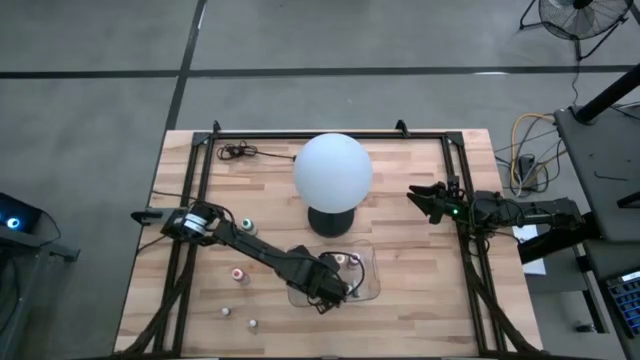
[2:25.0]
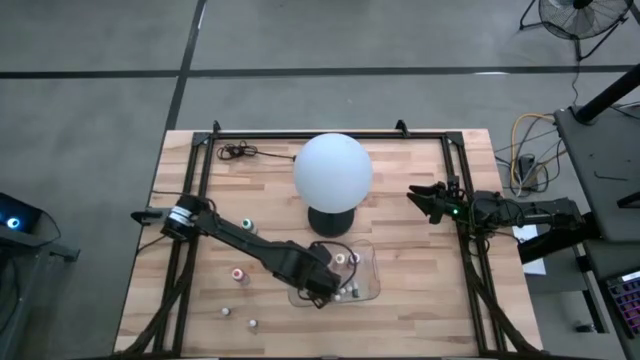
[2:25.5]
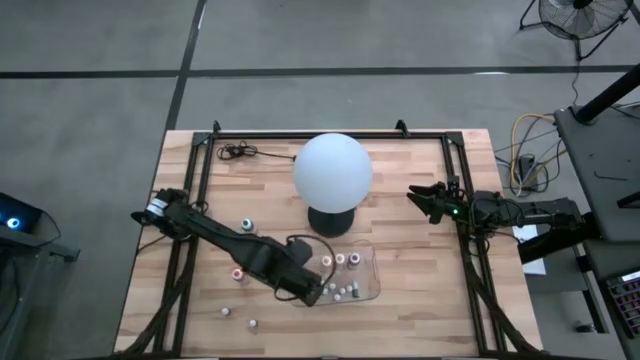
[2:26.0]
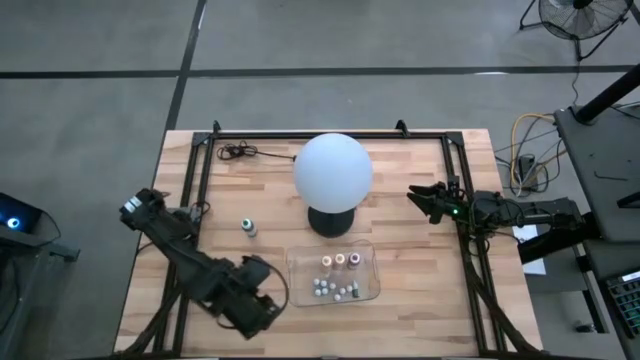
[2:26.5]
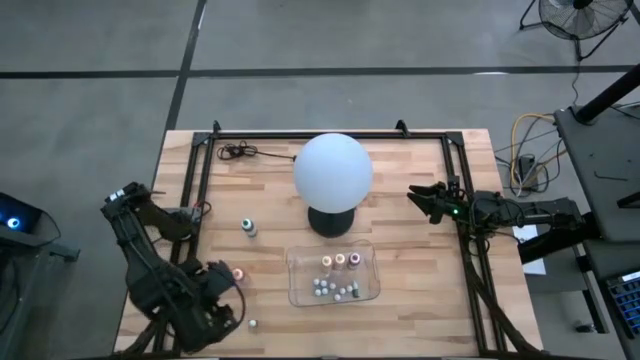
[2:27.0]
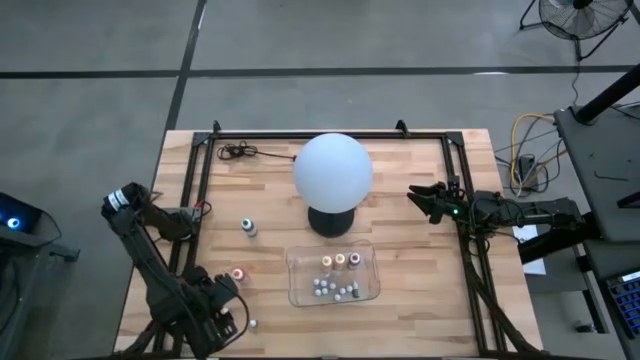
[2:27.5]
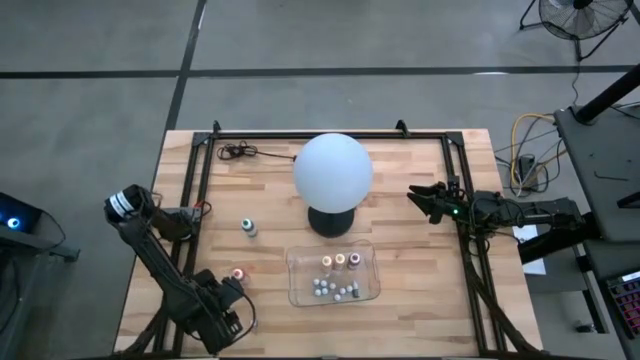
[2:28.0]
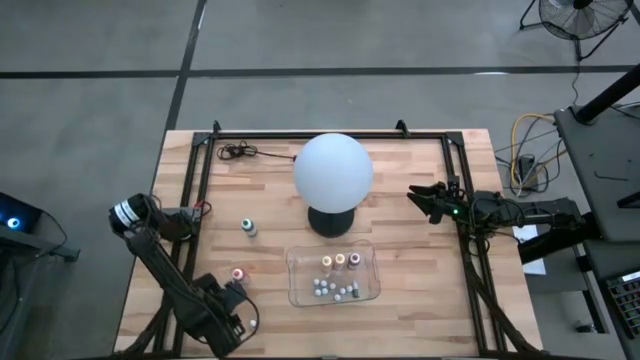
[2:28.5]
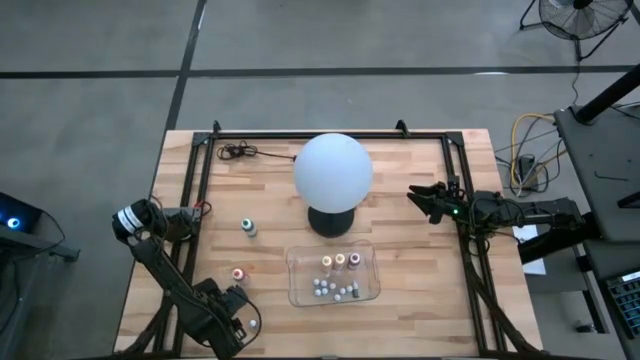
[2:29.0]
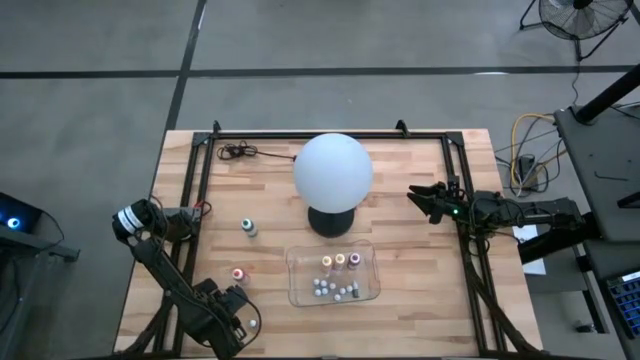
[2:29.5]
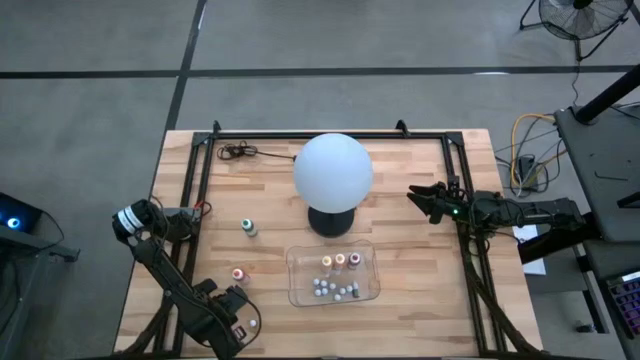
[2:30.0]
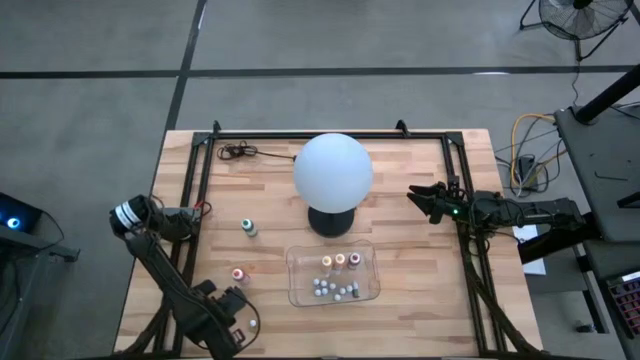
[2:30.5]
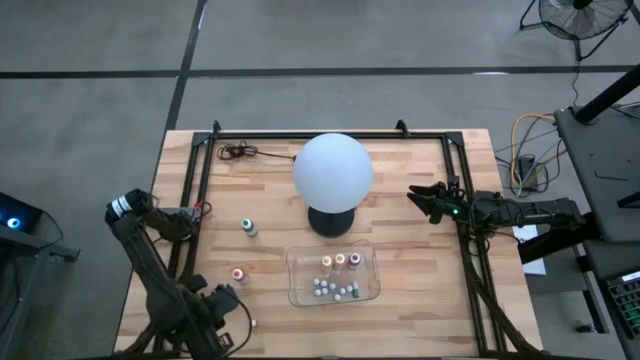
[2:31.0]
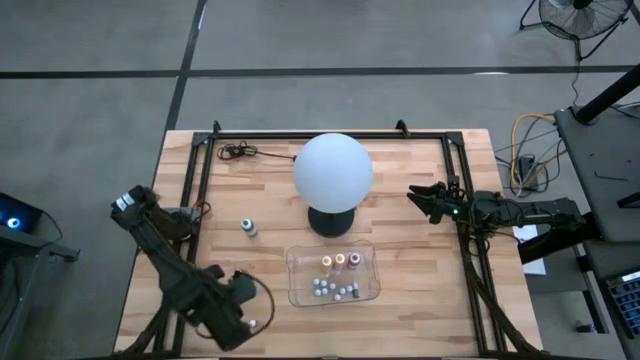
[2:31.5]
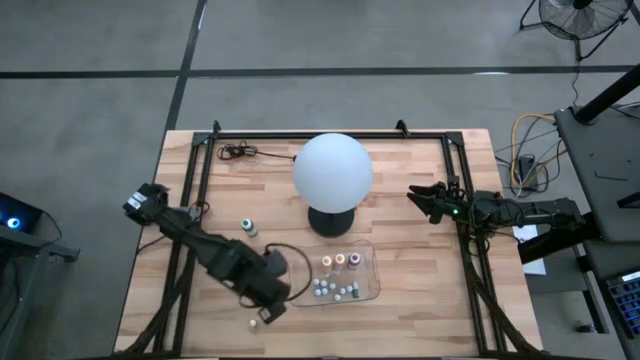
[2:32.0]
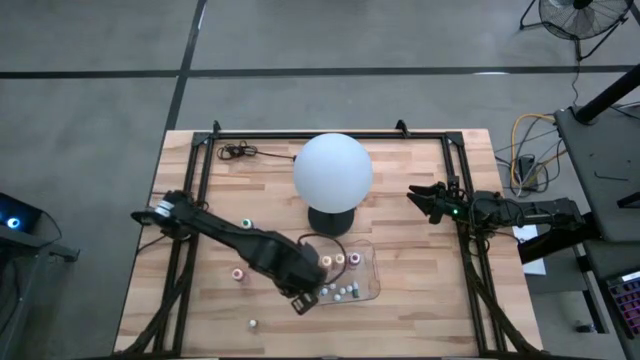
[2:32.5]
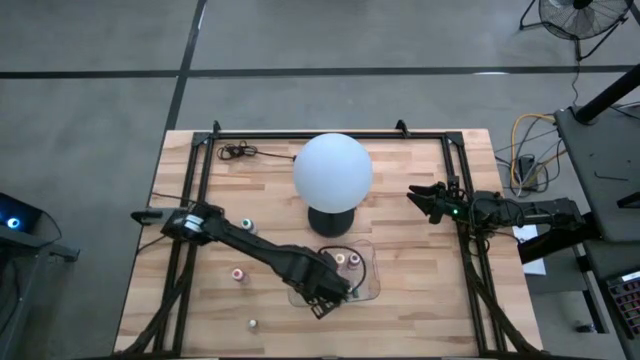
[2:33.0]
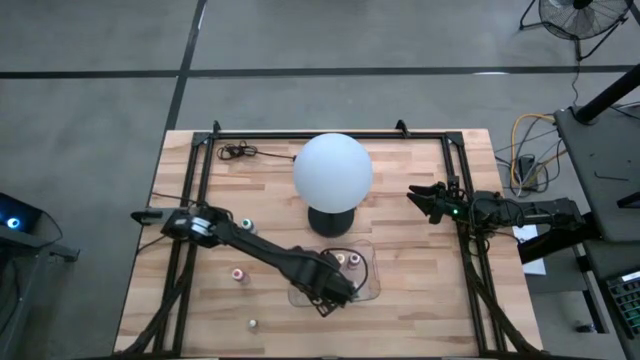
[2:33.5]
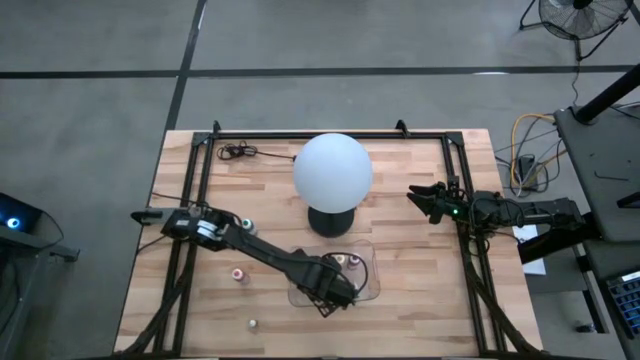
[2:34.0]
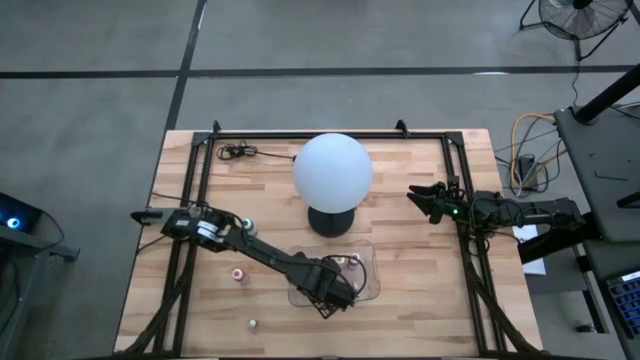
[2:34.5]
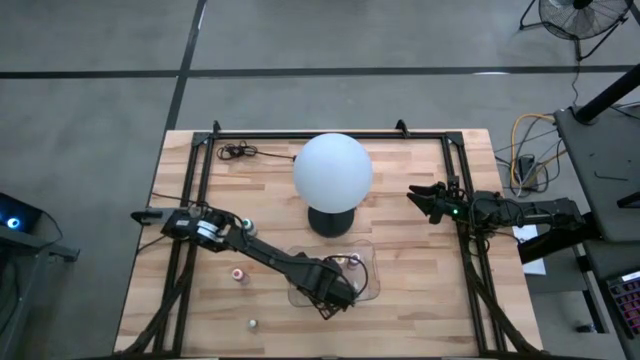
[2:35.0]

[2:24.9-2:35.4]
Task: Pick & Place food coloring
Put the left small blue food coloring bottle into the transparent bin

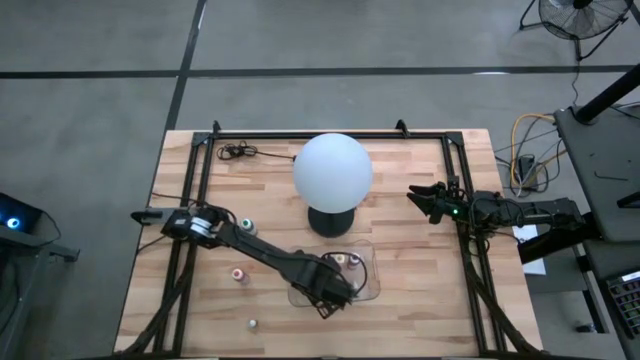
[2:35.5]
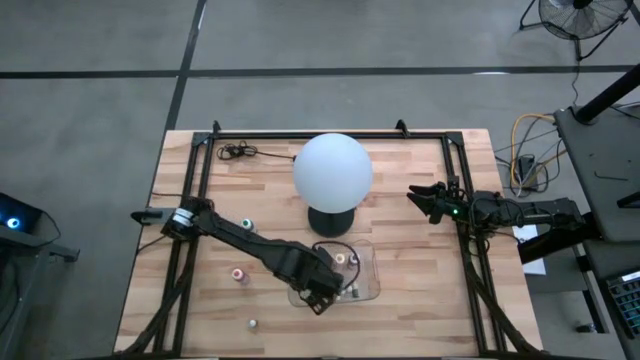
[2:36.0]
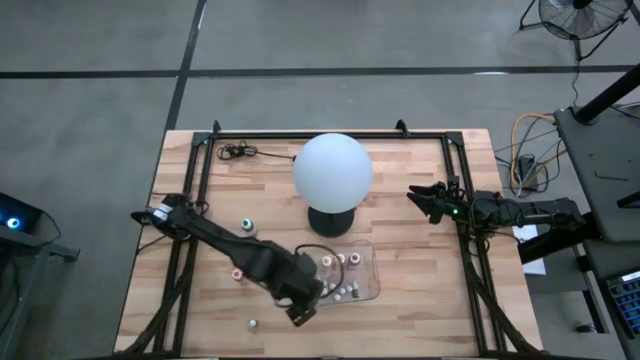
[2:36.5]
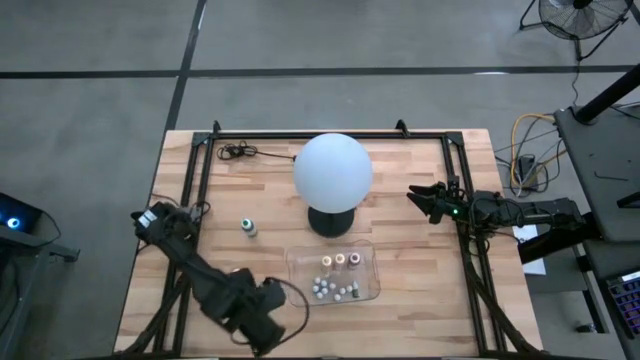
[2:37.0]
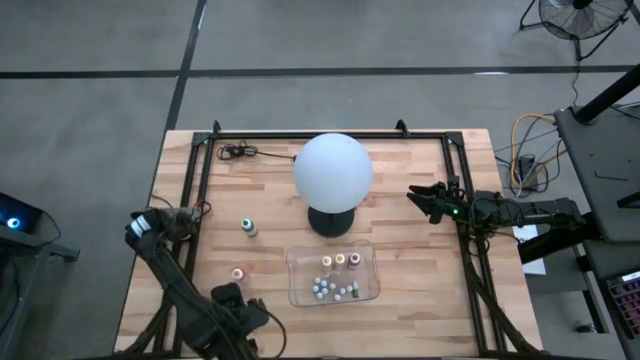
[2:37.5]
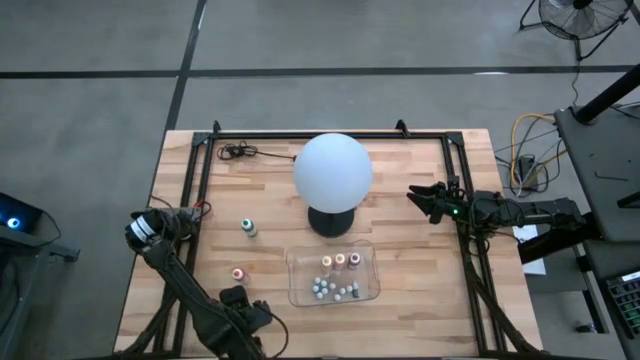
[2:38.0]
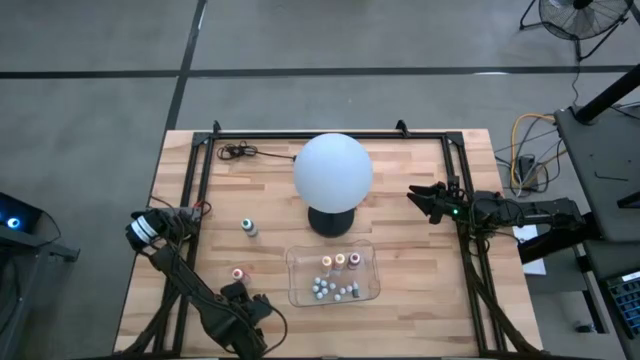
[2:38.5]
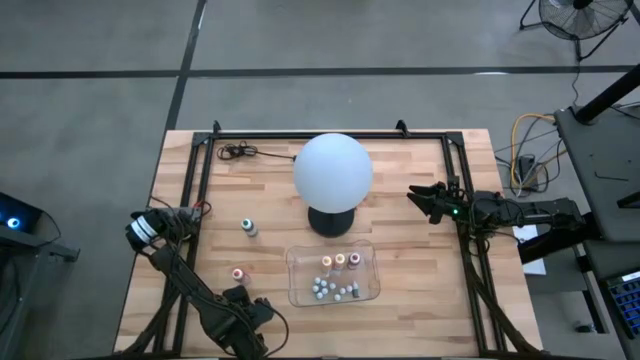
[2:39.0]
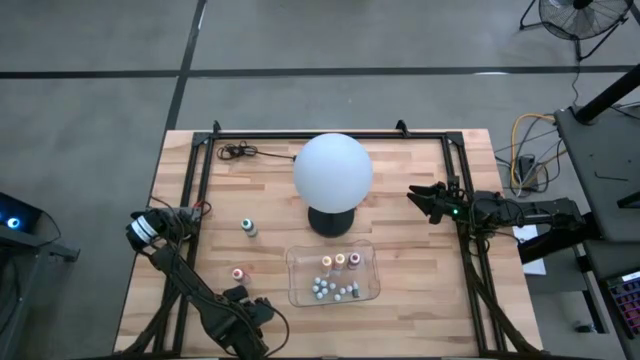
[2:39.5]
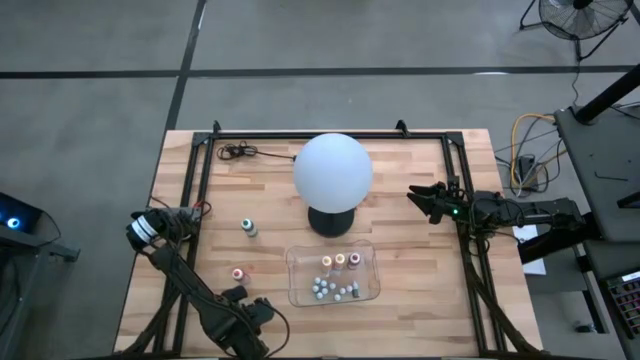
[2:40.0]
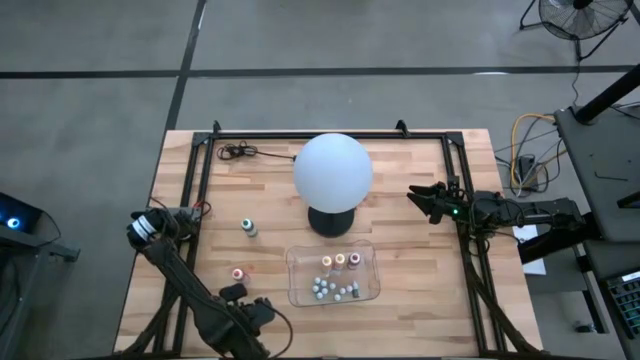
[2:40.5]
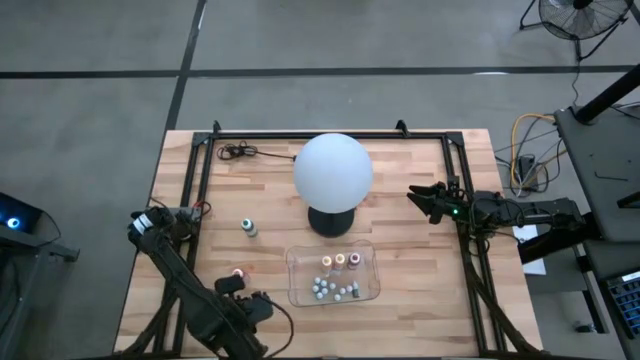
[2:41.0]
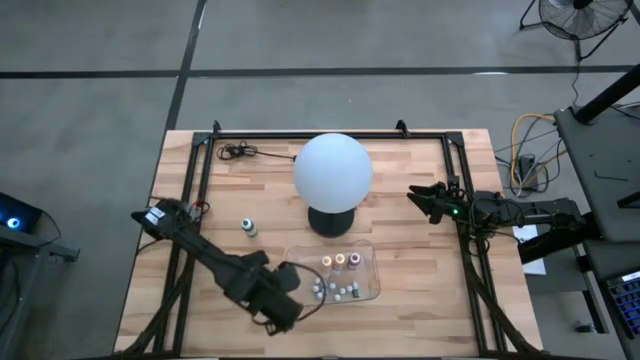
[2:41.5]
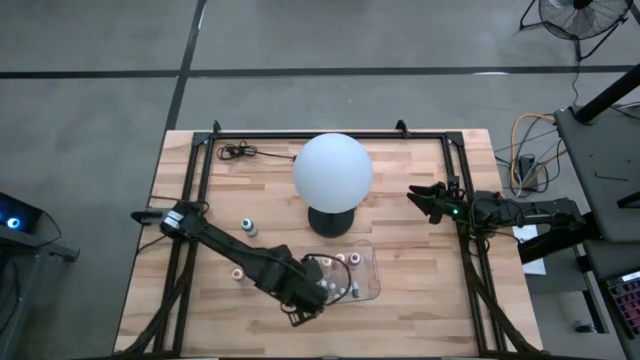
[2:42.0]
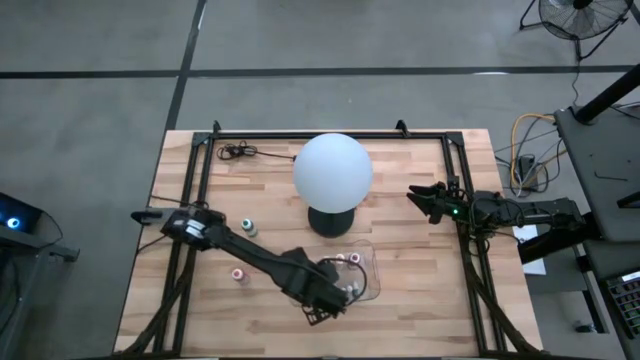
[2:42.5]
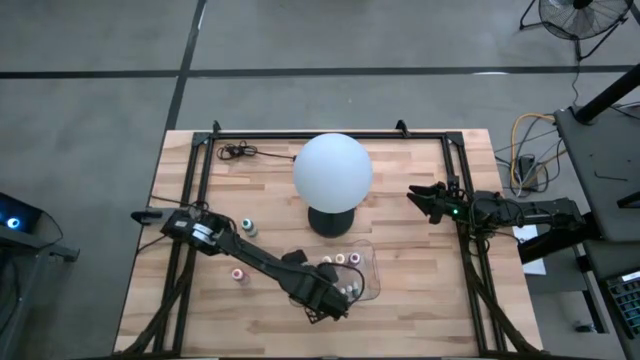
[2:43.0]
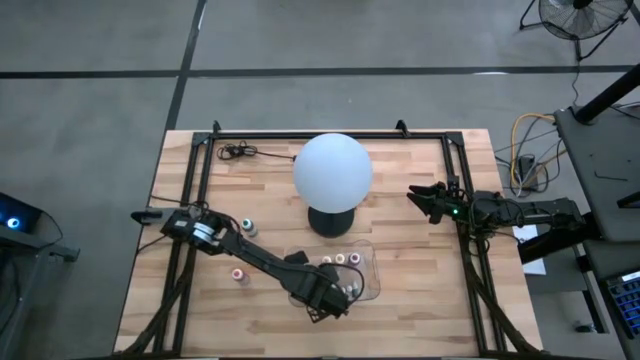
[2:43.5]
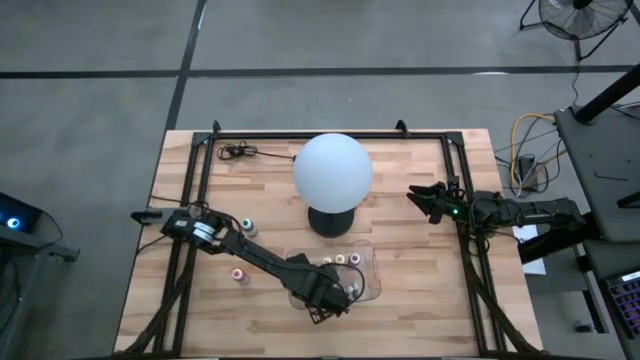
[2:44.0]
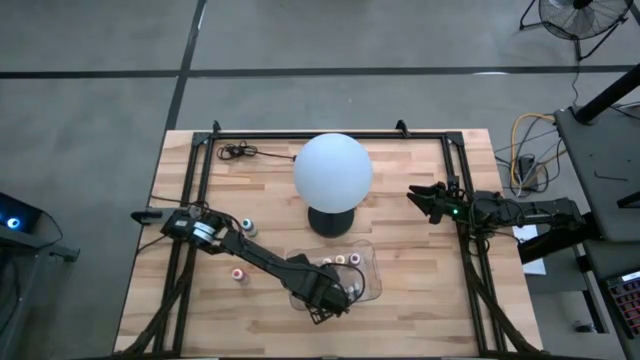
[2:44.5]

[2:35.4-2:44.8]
Put the small blue food coloring bottle into the transparent bin
